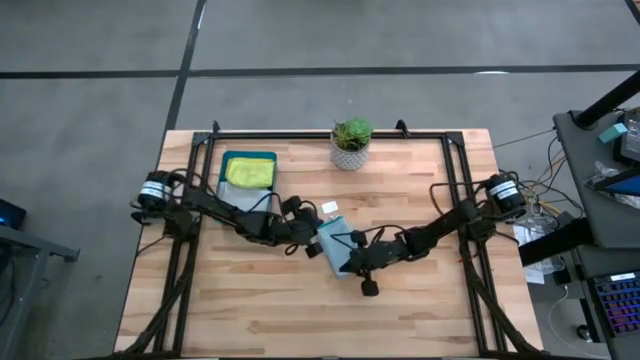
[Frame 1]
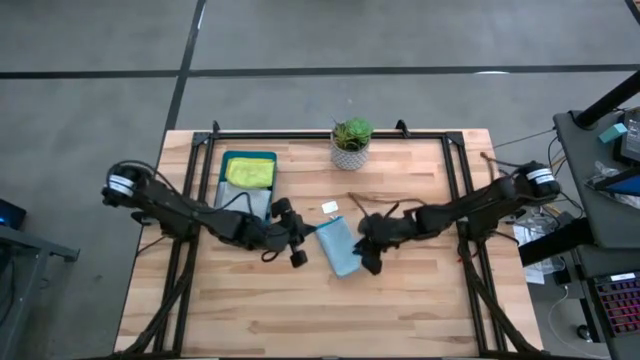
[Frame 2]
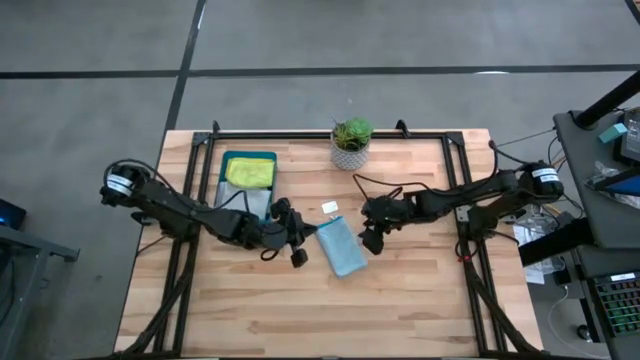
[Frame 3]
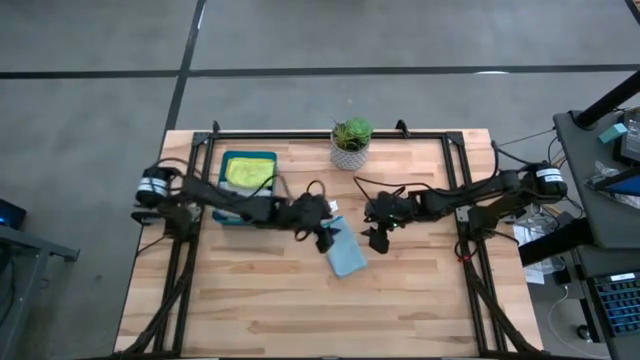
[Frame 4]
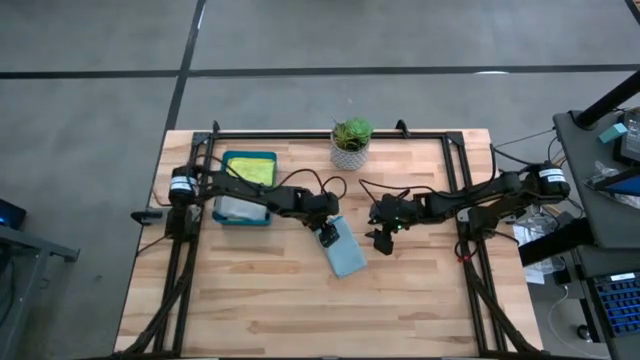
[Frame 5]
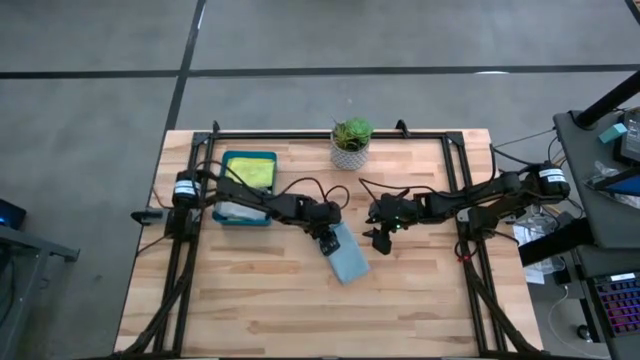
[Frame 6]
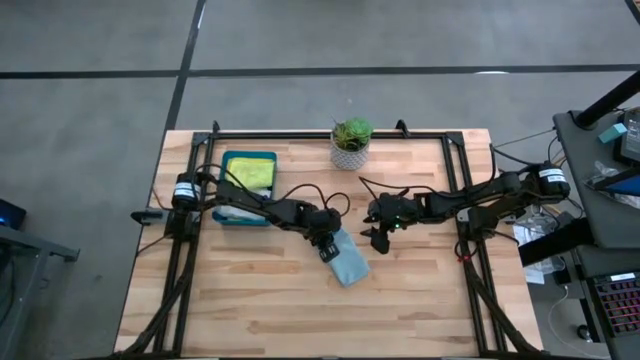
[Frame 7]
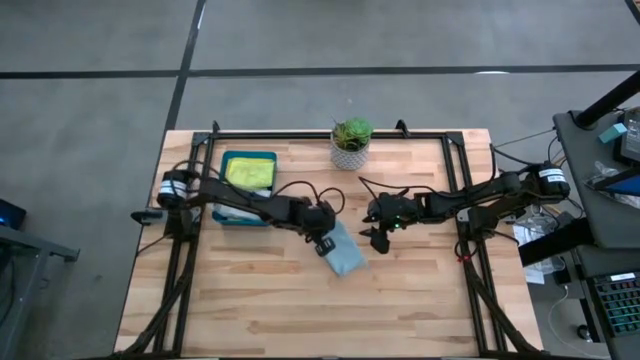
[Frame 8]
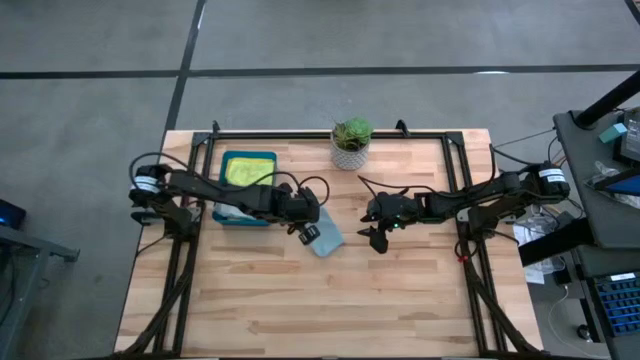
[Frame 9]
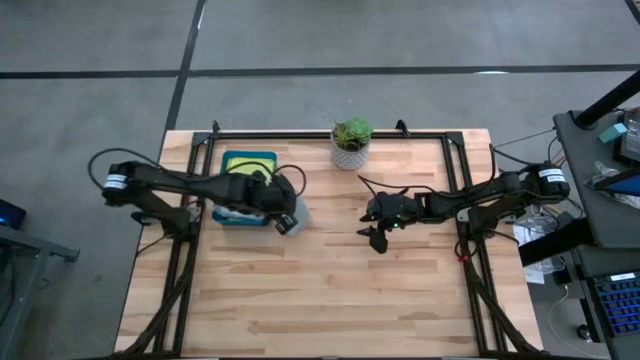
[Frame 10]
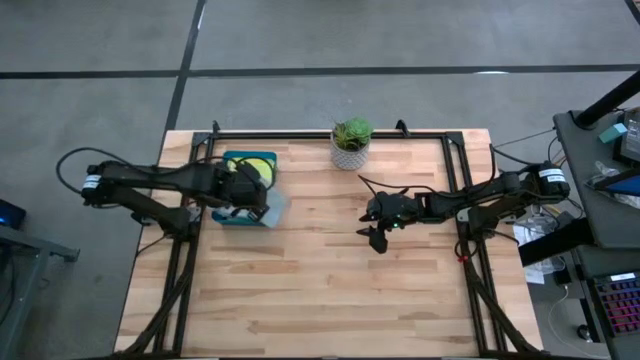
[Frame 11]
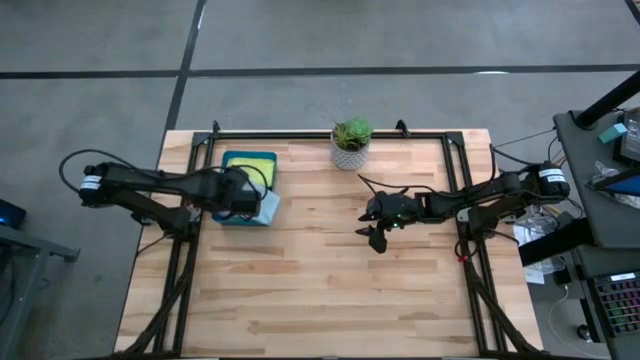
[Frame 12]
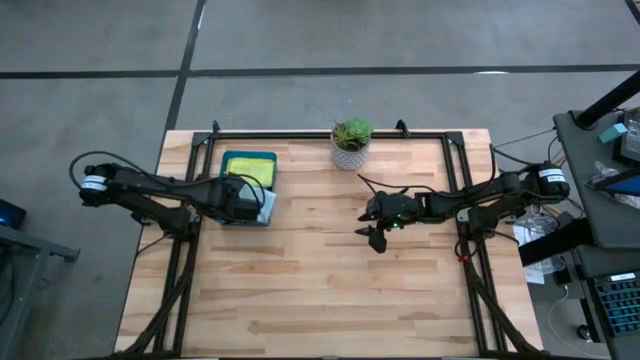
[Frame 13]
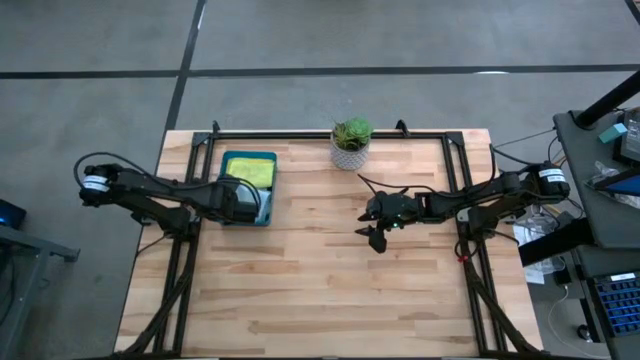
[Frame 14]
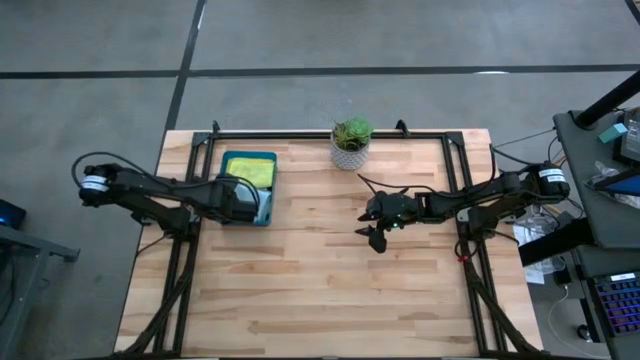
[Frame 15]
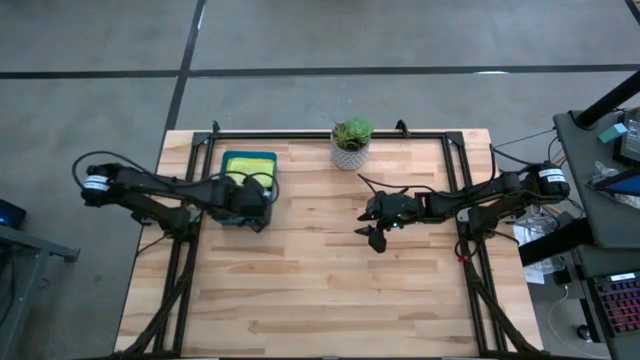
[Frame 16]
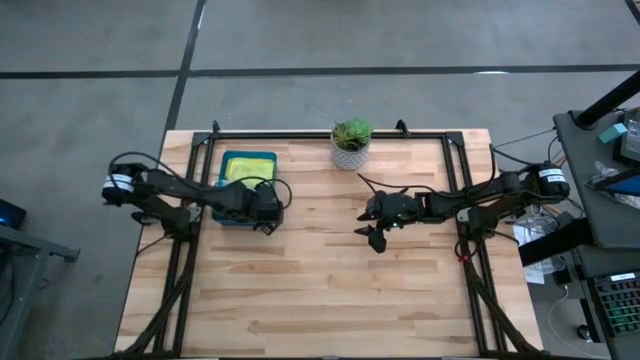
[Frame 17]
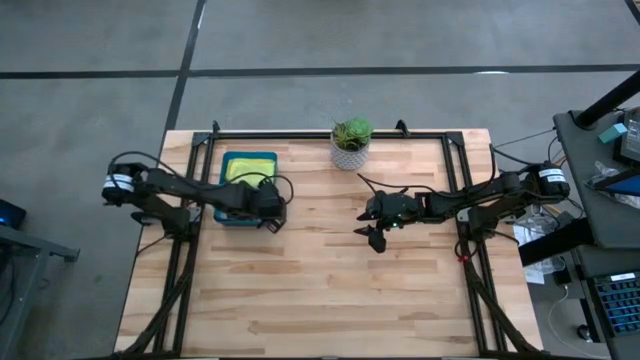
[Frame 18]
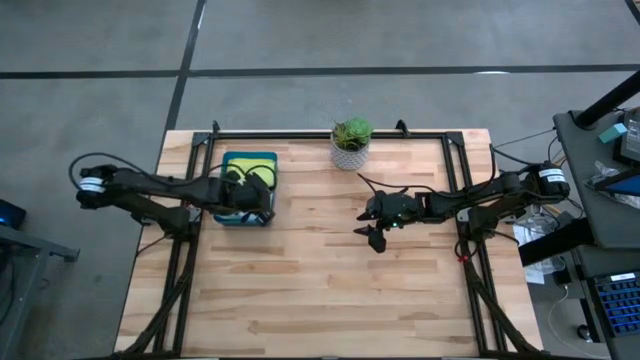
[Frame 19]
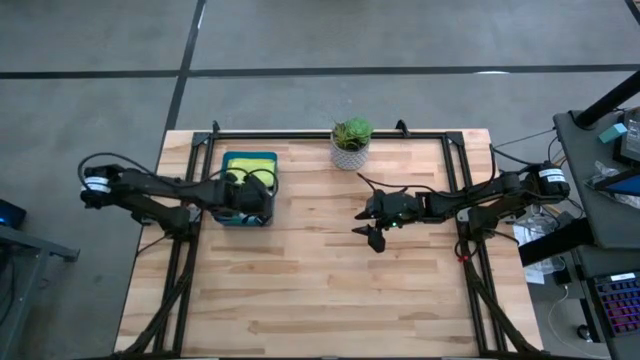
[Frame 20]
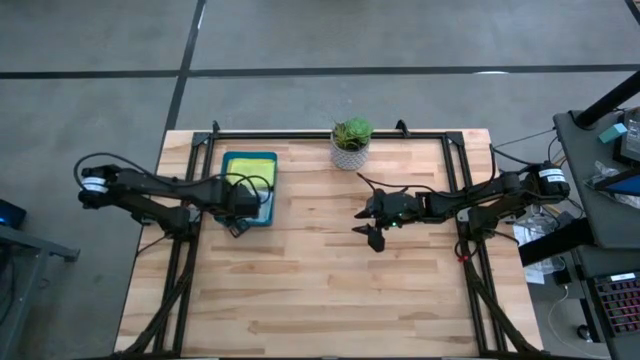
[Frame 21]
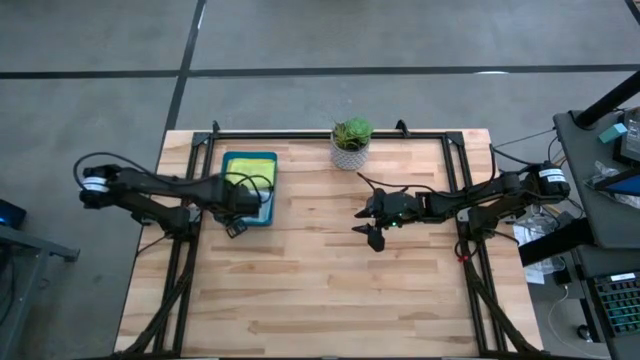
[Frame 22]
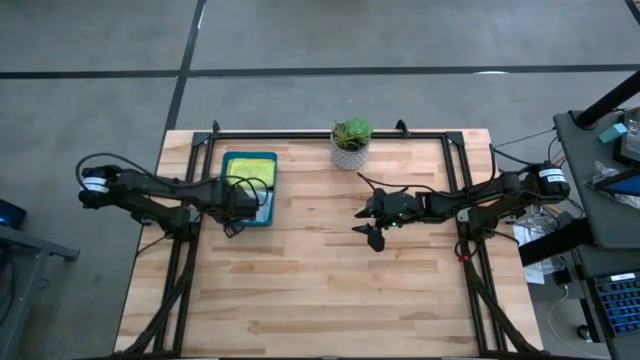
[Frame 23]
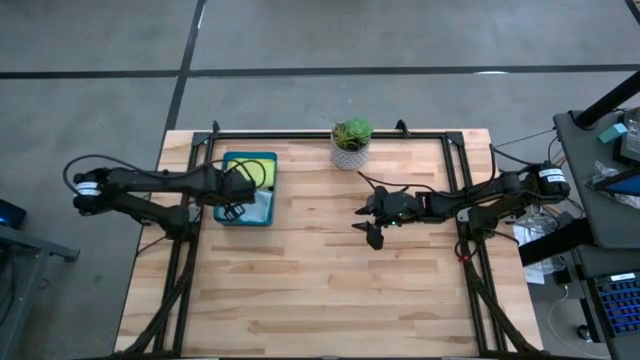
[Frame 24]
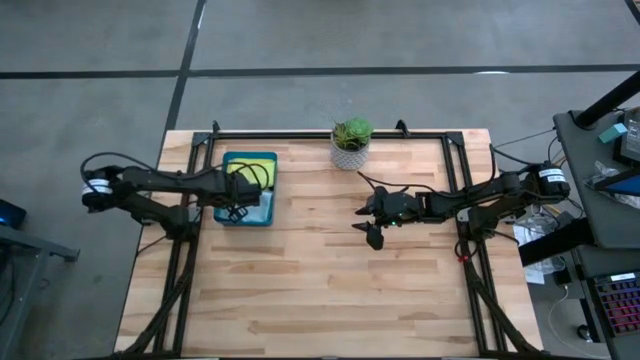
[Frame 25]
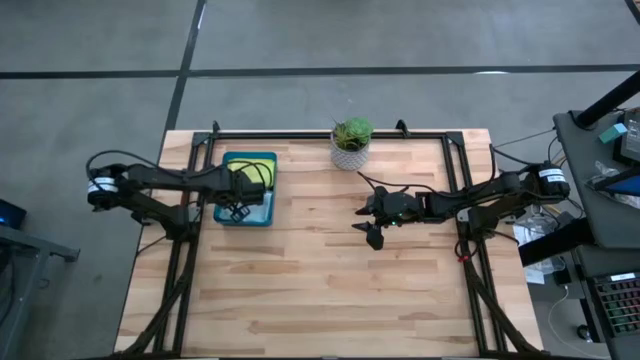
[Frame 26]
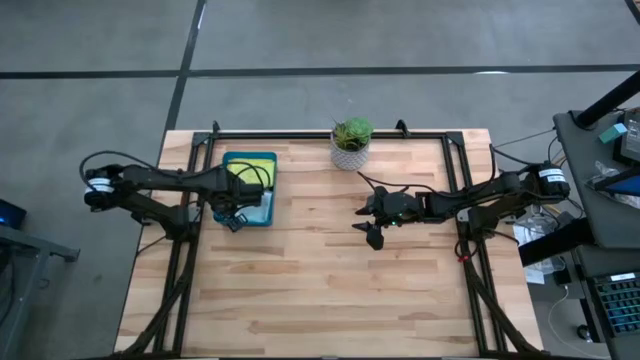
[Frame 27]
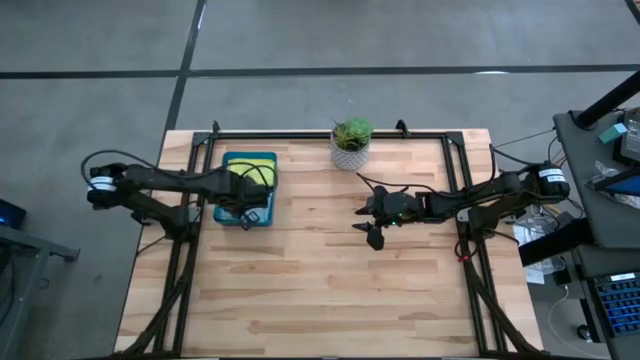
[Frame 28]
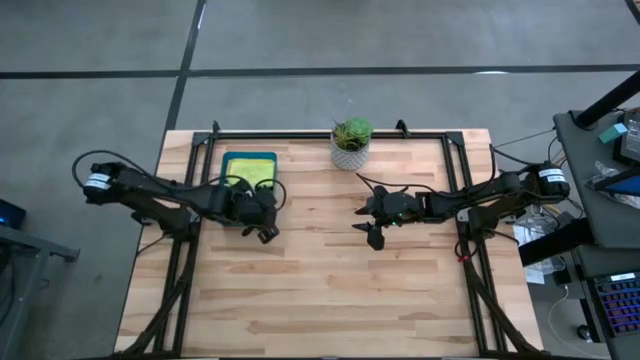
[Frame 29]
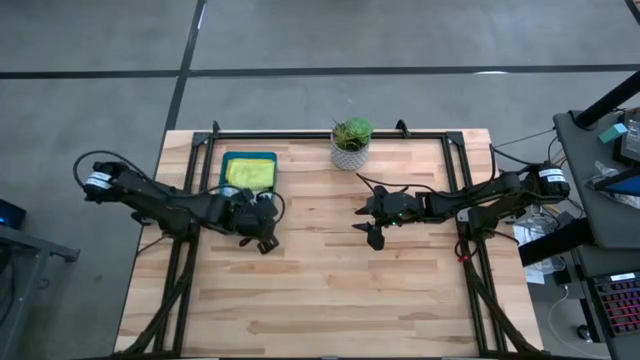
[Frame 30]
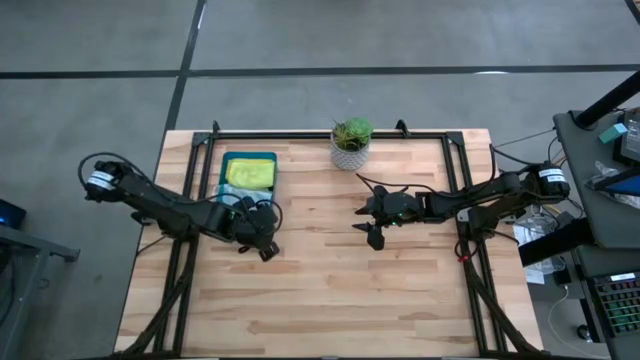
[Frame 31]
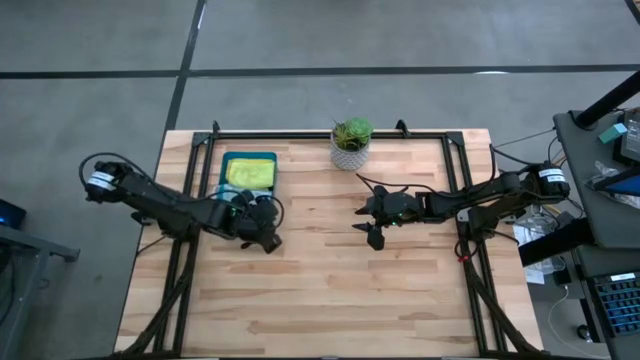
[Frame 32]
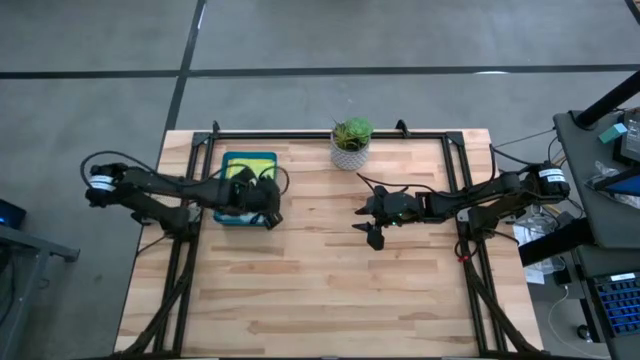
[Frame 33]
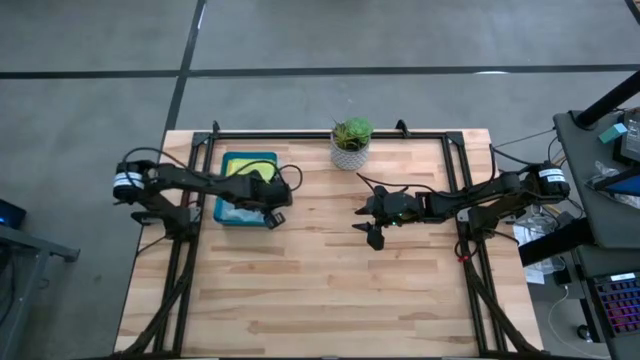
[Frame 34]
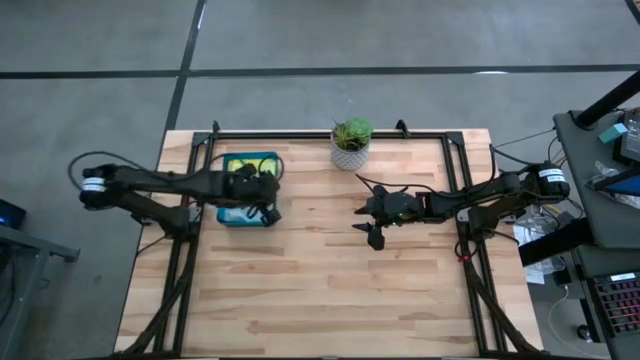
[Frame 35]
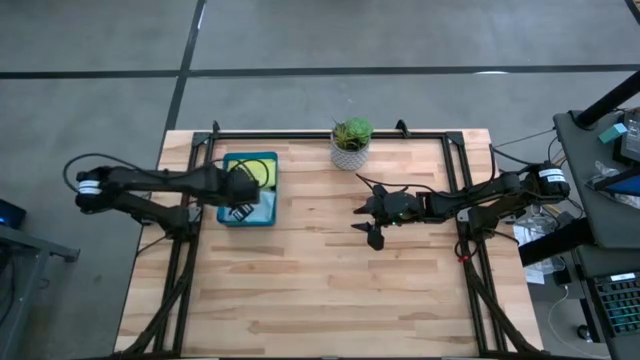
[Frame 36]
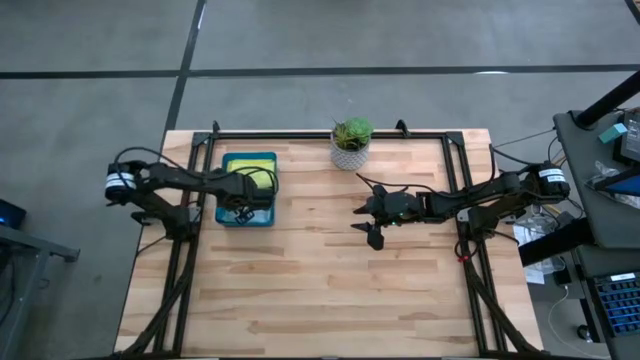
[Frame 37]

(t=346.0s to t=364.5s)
Task: Fold microfiber towels
Put the folded blue towel into the blue bin

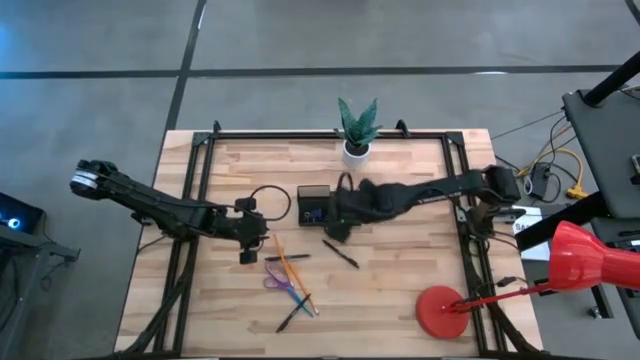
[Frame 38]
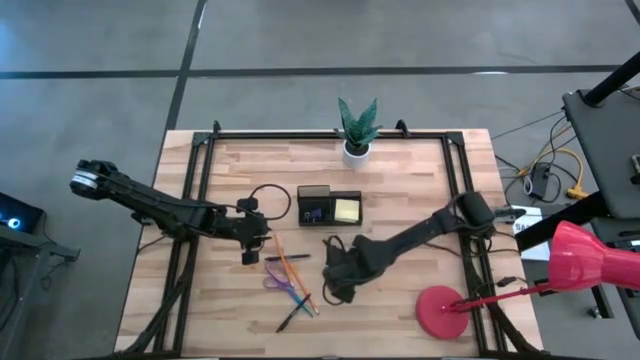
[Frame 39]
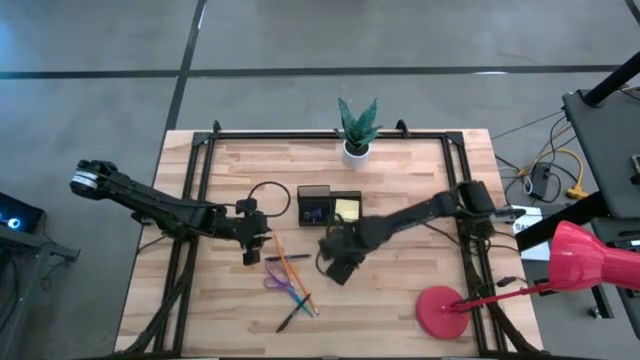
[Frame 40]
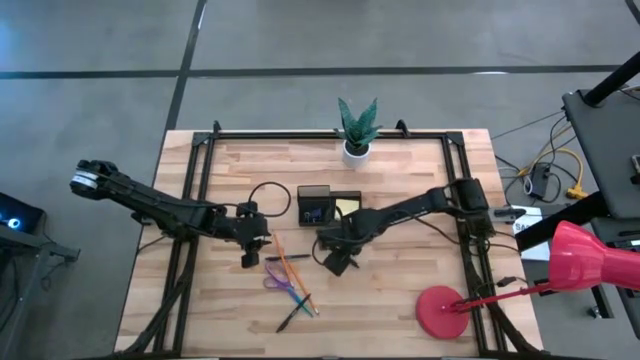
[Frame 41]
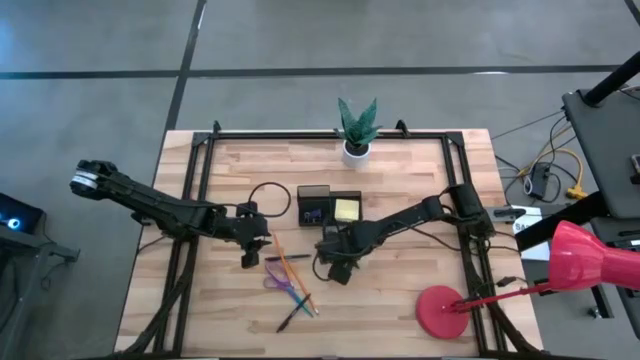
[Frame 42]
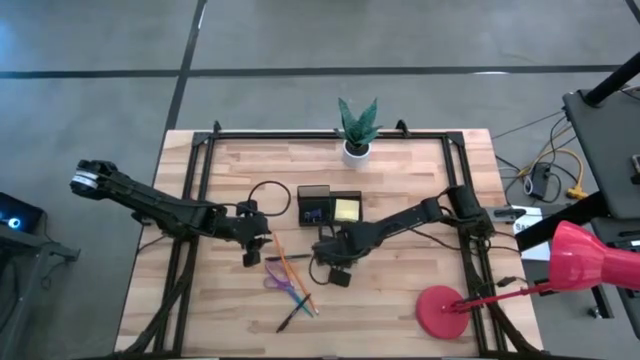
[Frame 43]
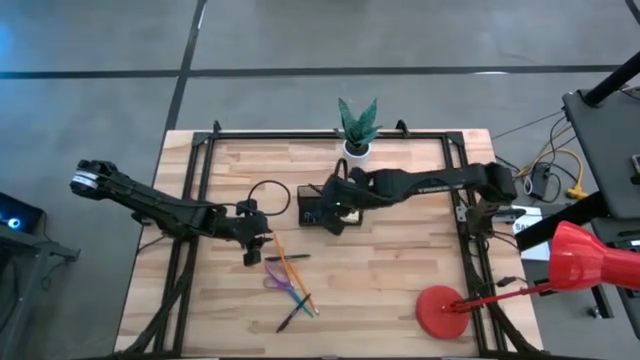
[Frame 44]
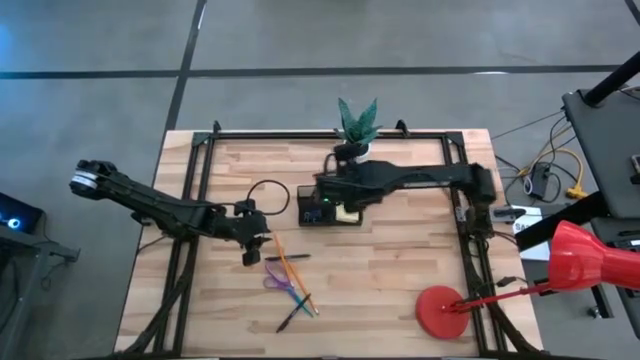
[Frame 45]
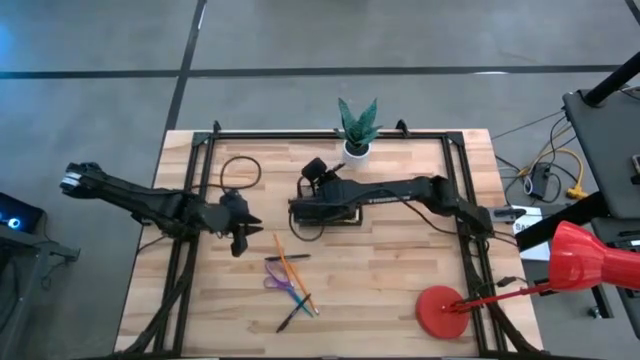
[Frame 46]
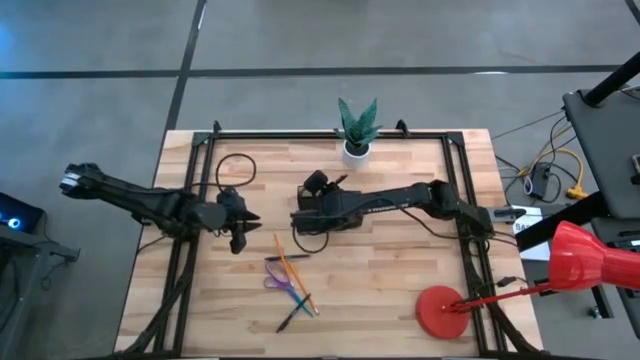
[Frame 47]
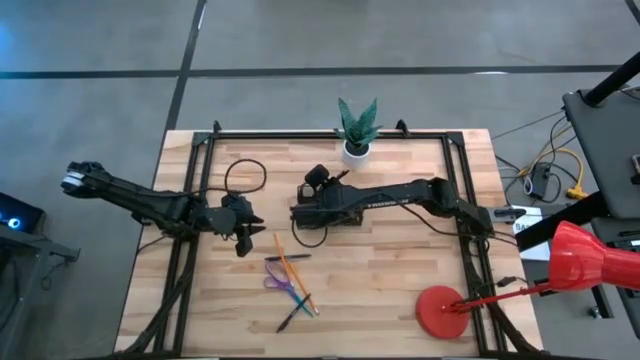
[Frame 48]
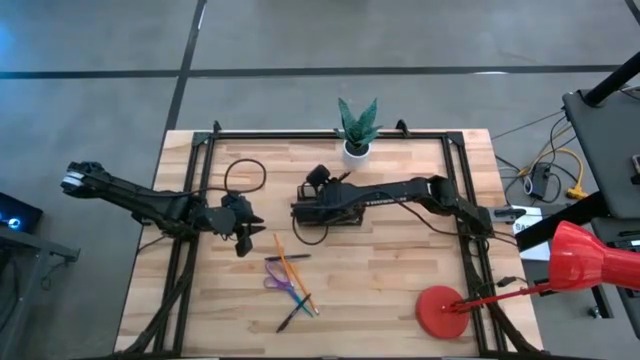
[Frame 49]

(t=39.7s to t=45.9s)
Task: Pick and place office supplies into organizer
Put the top right pen into the desk organizer
